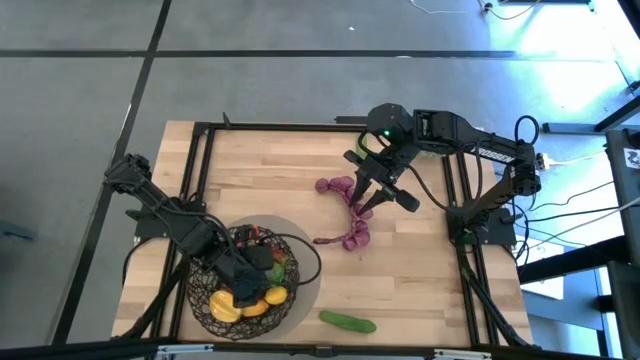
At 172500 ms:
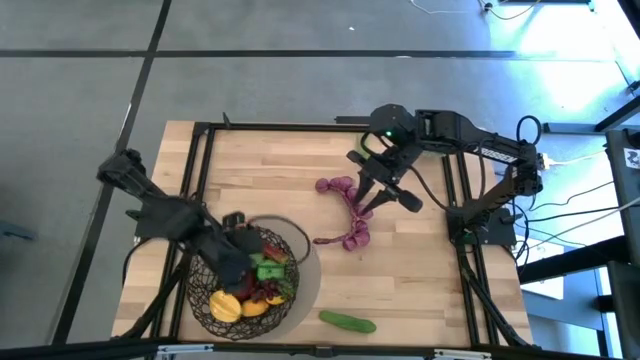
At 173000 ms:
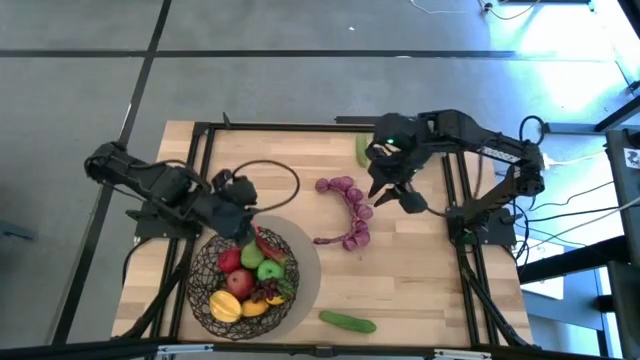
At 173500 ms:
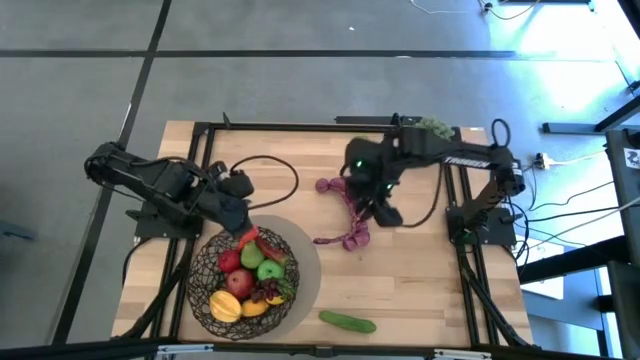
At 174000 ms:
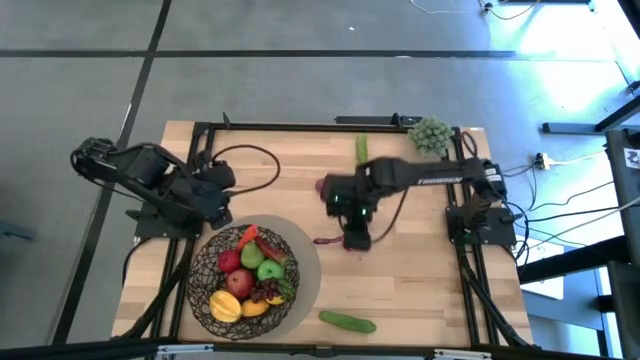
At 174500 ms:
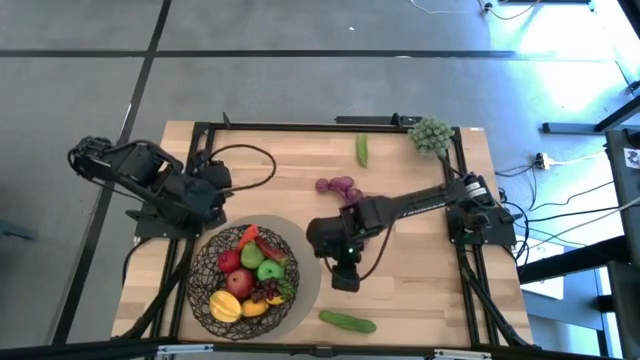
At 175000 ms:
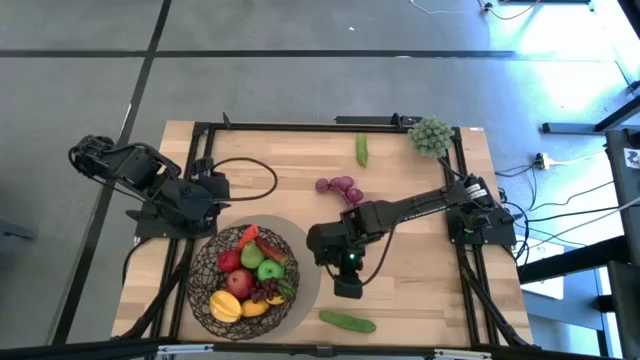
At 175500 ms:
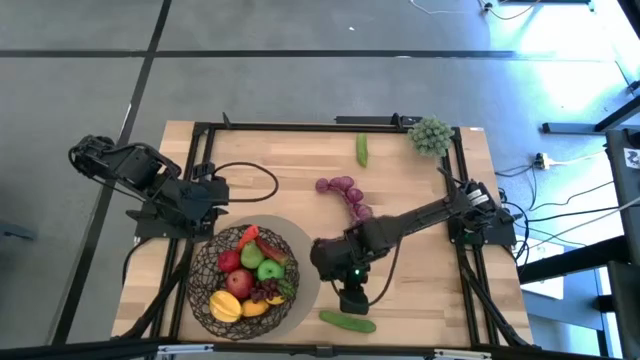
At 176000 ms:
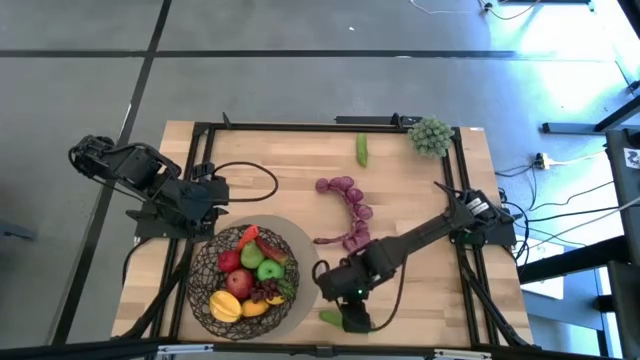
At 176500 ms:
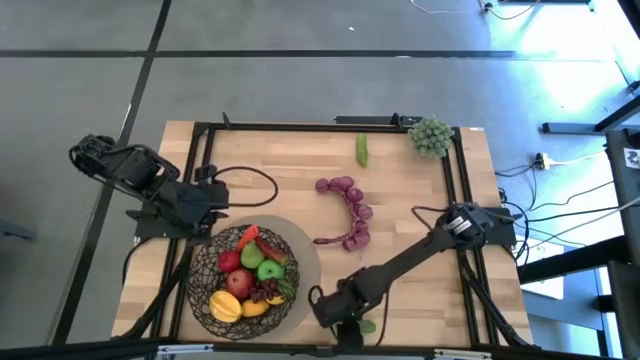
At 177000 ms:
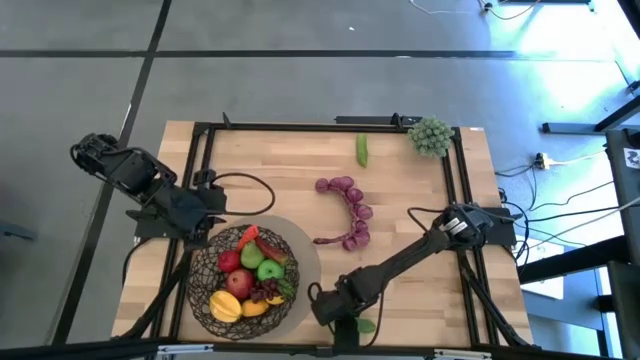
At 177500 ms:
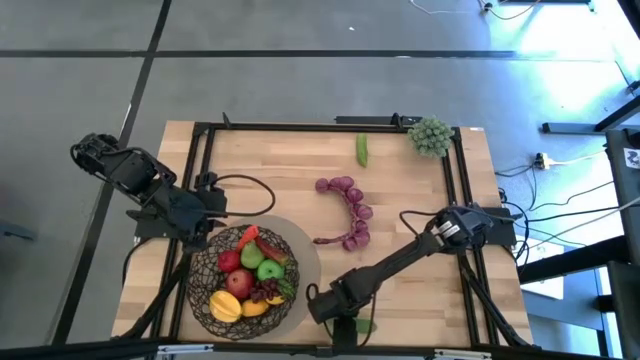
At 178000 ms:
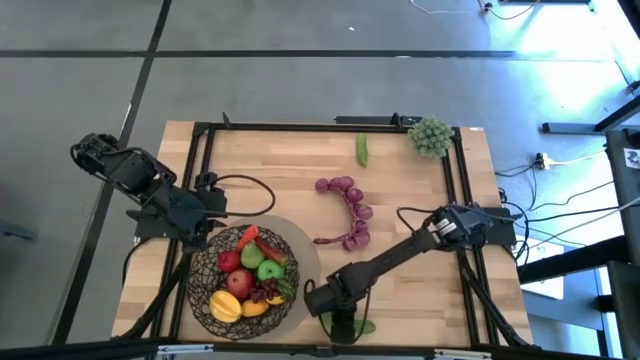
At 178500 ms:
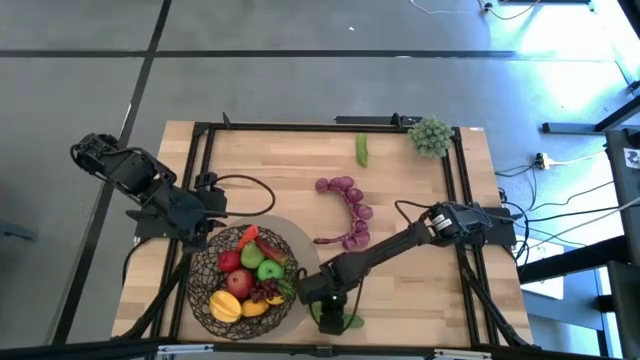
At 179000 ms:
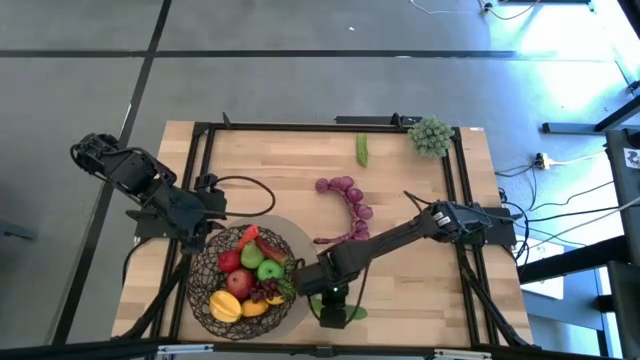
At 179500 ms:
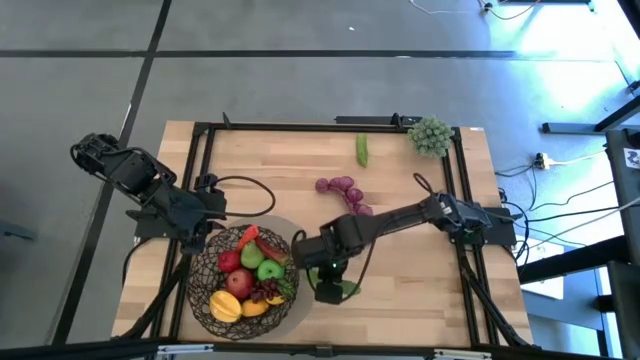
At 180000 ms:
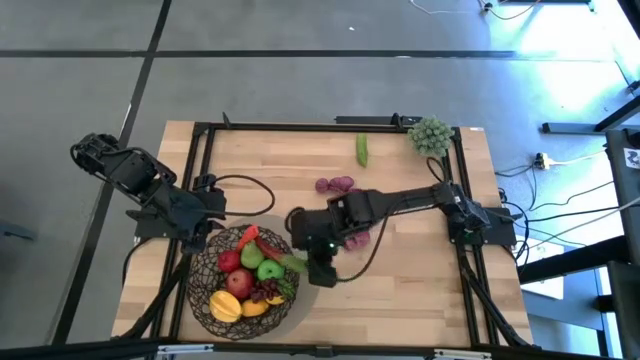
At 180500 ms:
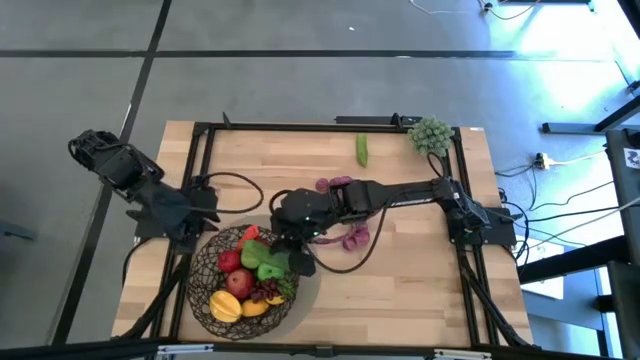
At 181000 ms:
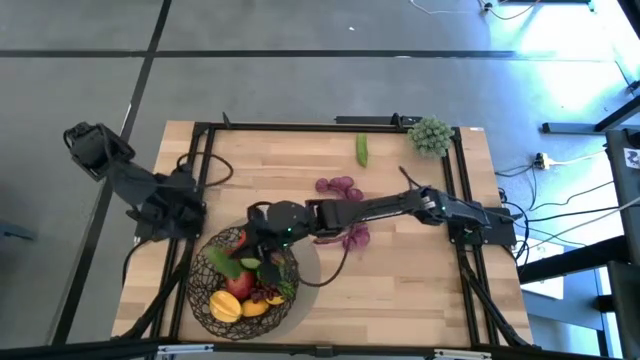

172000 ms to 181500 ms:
Task: Build produce basket
Put the bottom green cucumber into the black wire basket

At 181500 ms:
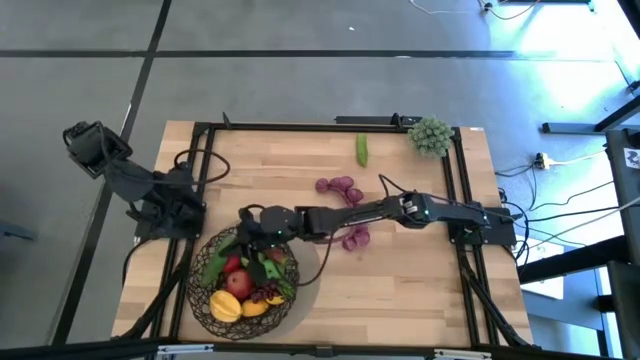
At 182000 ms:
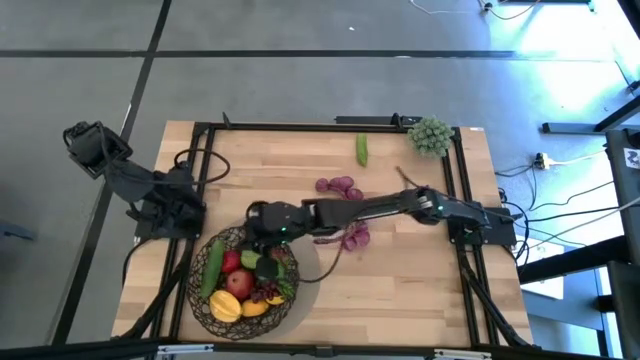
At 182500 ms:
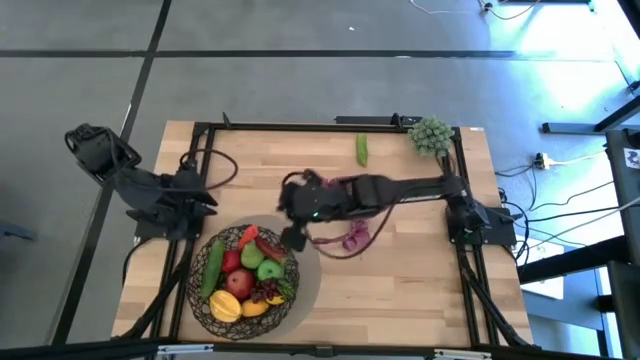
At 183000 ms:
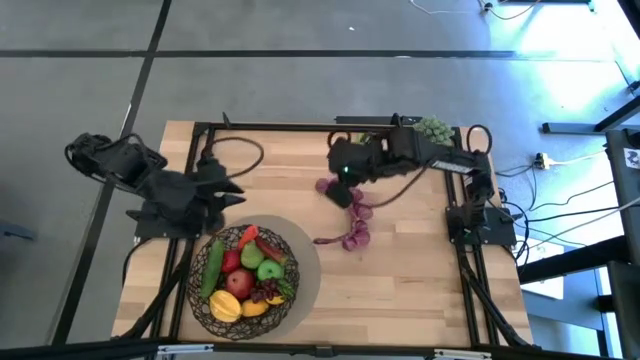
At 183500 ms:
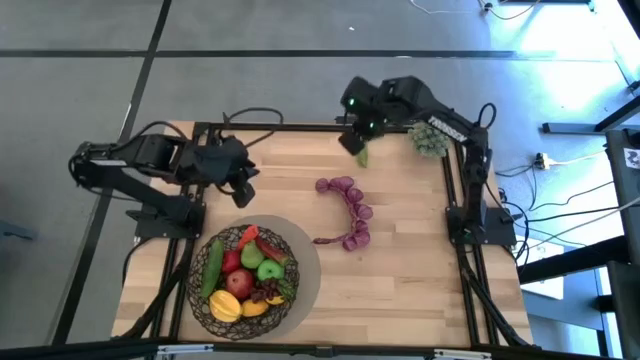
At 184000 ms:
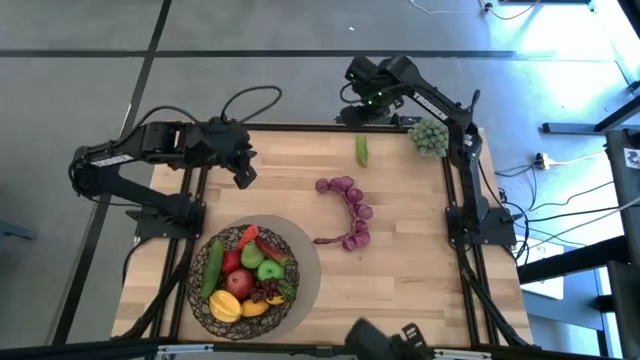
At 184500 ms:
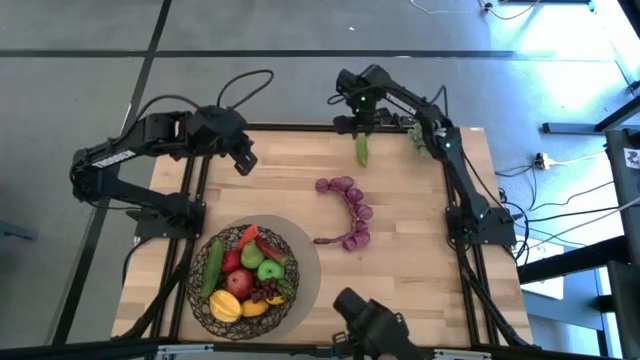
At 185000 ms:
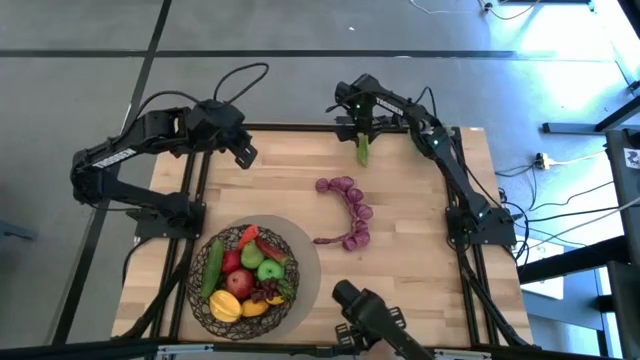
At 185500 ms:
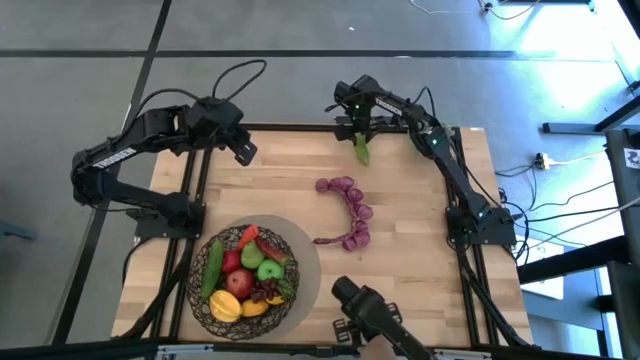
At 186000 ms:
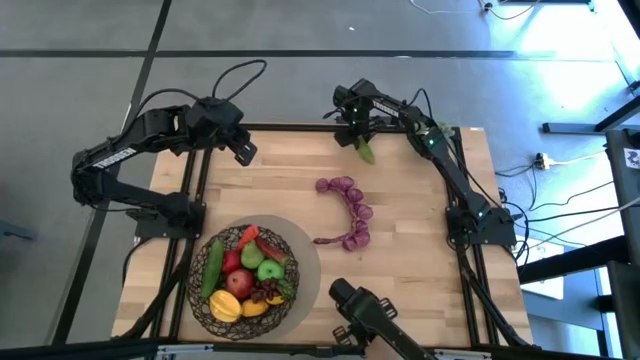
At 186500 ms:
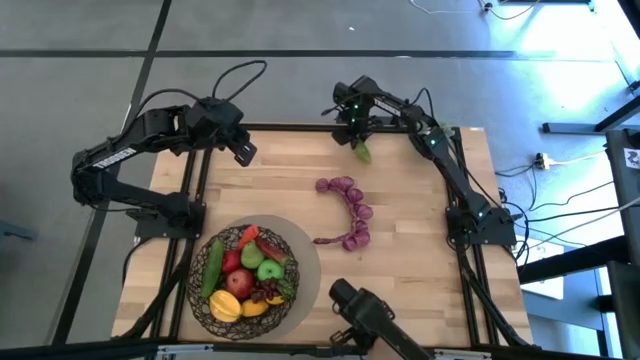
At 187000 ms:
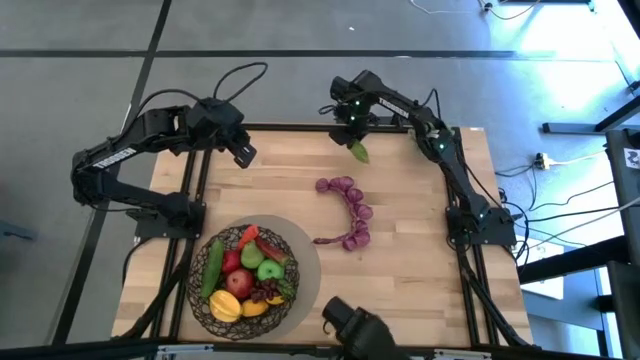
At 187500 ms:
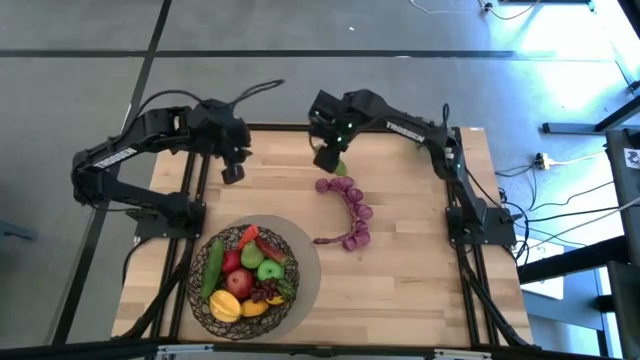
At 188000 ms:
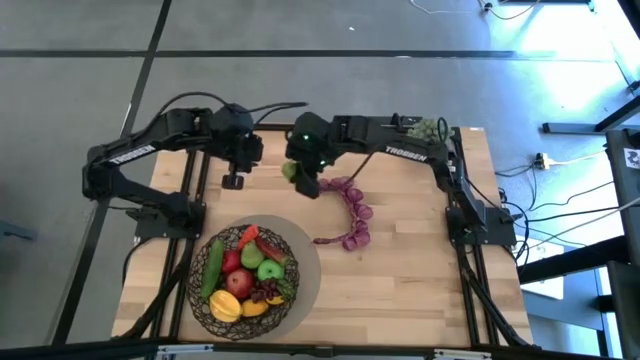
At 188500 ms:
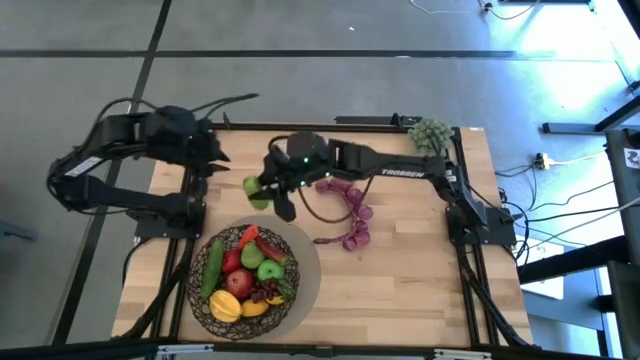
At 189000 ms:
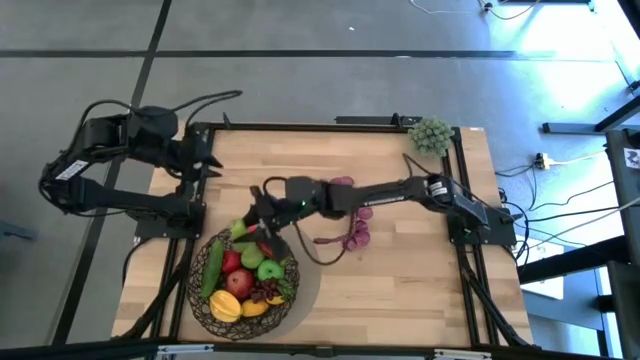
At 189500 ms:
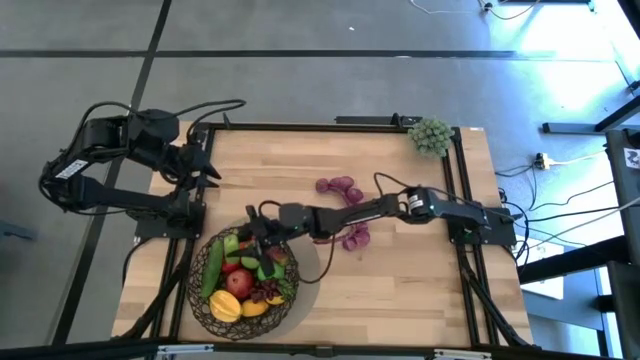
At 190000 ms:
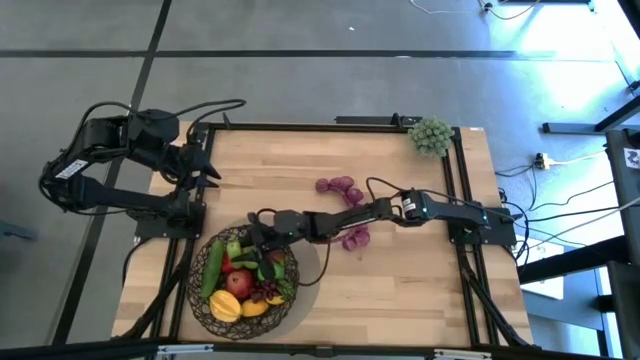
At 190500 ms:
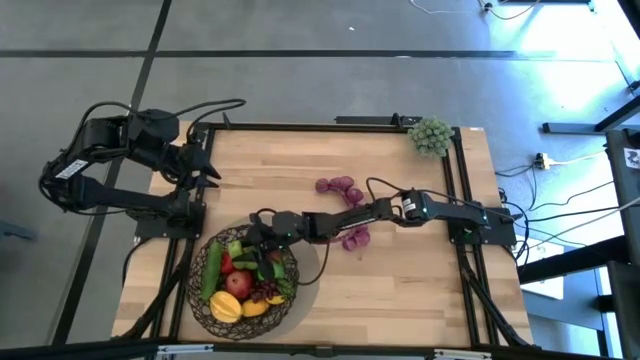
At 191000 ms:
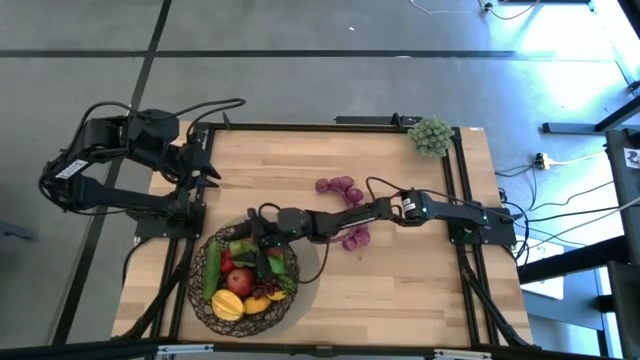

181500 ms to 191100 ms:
Put the green cucumber into the black wire basket
